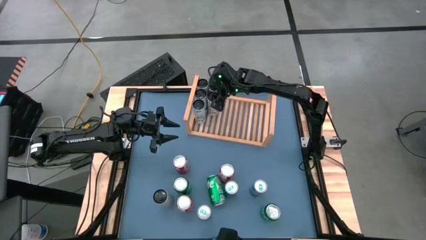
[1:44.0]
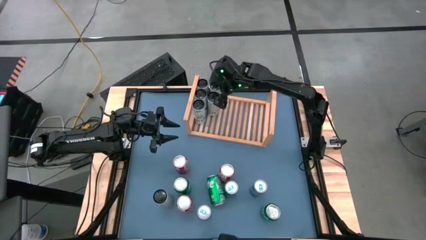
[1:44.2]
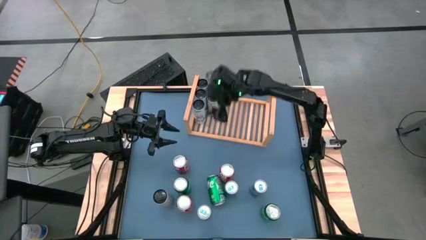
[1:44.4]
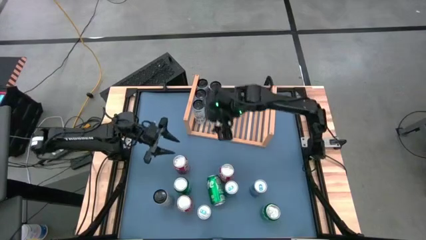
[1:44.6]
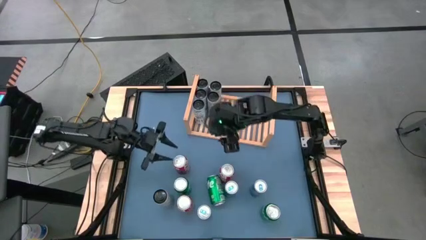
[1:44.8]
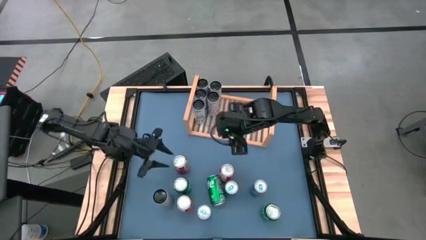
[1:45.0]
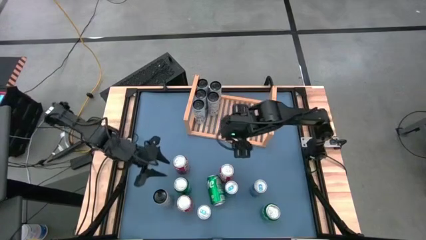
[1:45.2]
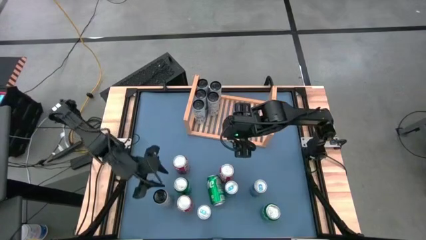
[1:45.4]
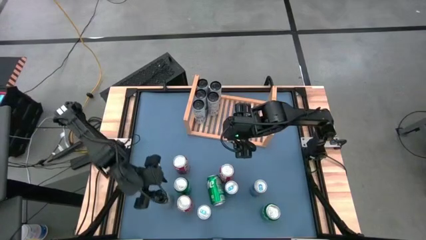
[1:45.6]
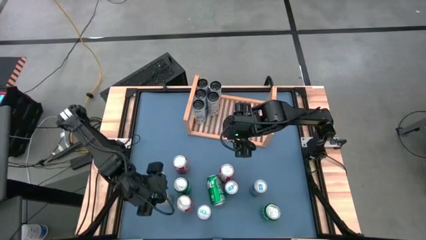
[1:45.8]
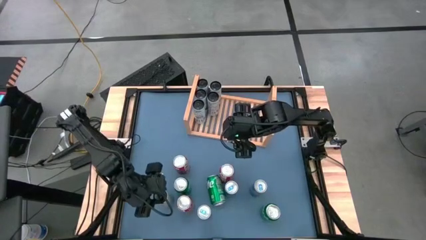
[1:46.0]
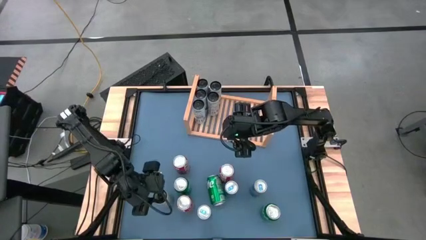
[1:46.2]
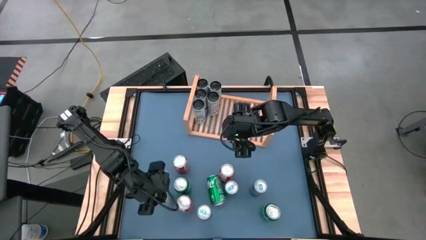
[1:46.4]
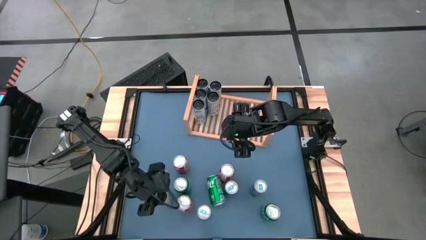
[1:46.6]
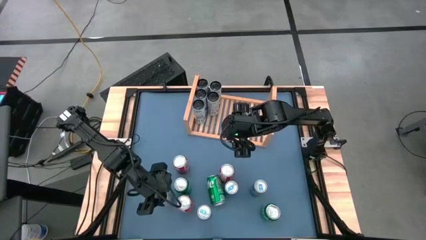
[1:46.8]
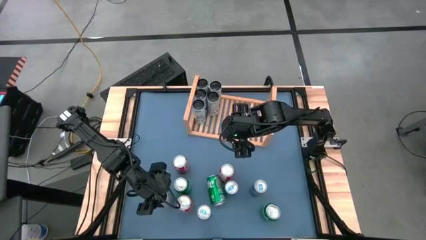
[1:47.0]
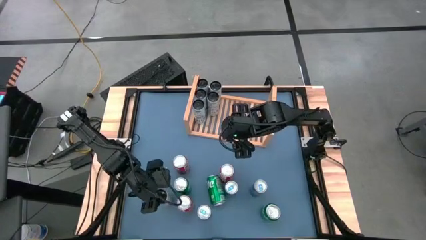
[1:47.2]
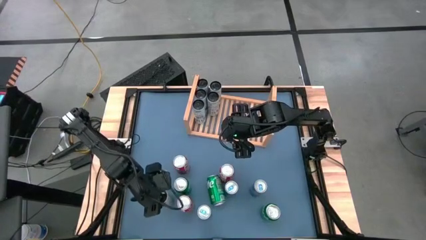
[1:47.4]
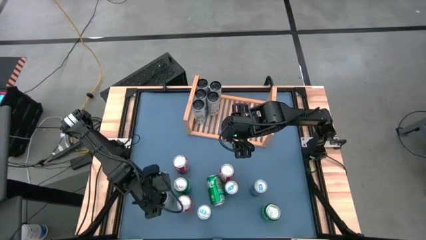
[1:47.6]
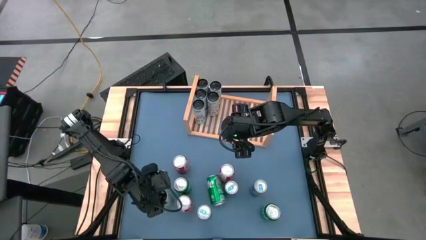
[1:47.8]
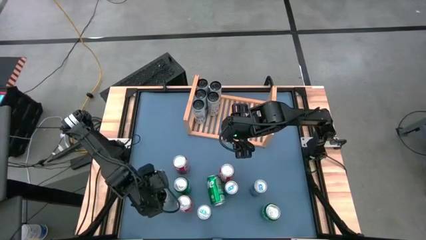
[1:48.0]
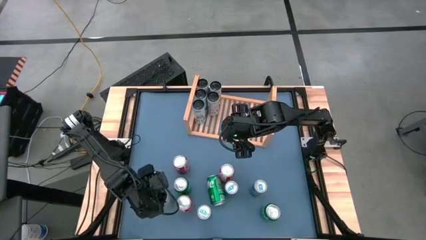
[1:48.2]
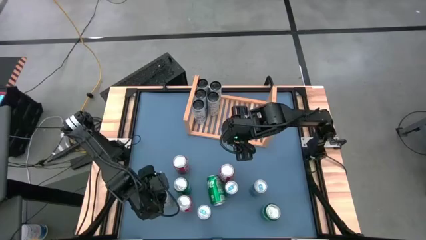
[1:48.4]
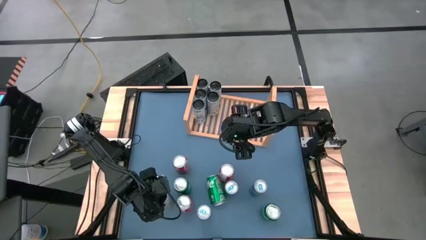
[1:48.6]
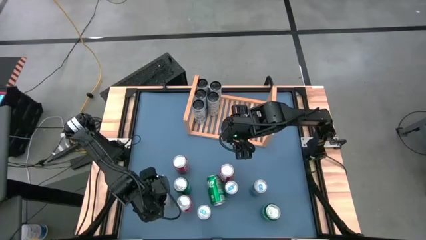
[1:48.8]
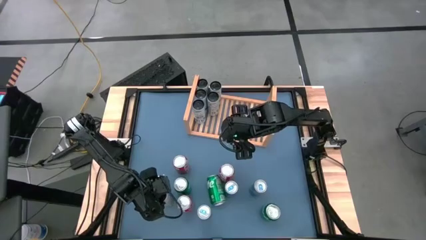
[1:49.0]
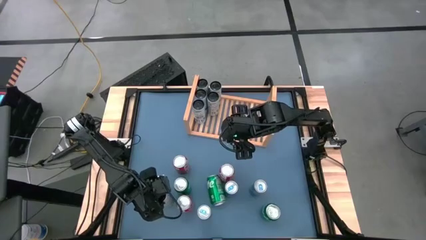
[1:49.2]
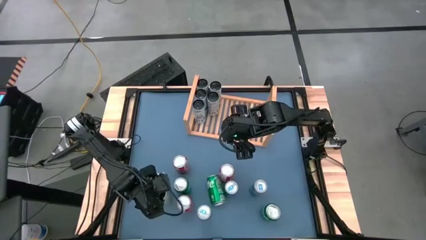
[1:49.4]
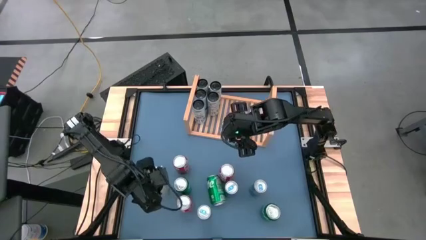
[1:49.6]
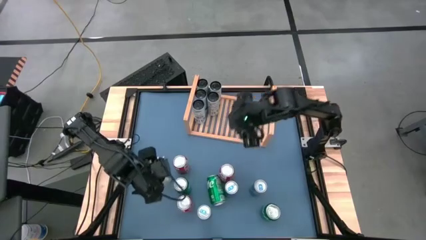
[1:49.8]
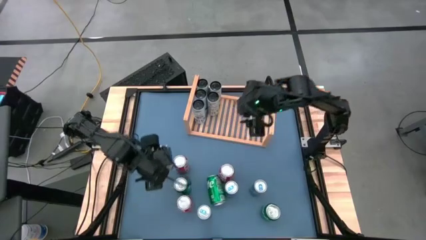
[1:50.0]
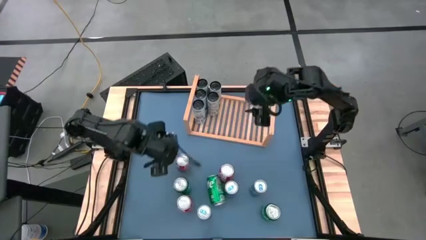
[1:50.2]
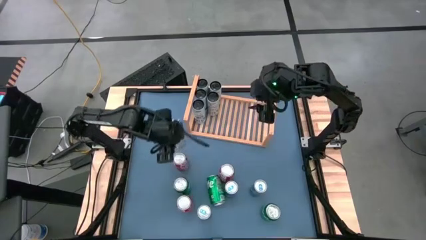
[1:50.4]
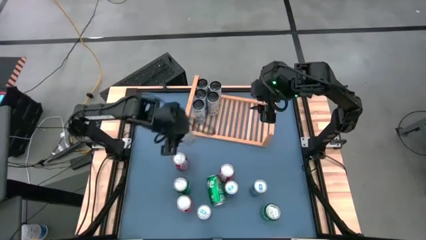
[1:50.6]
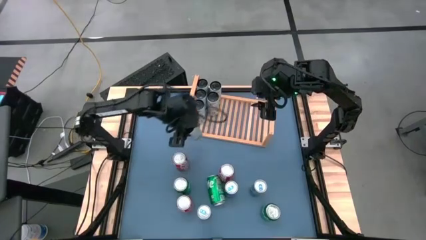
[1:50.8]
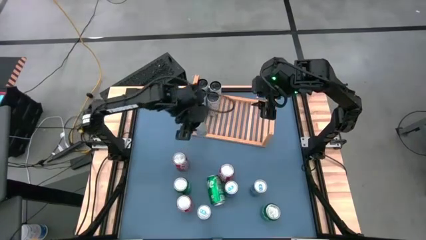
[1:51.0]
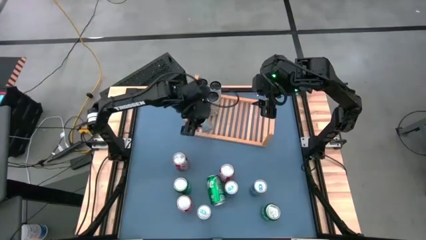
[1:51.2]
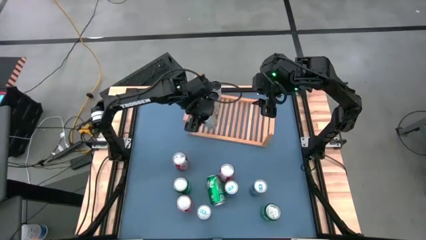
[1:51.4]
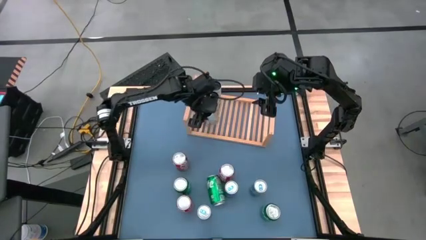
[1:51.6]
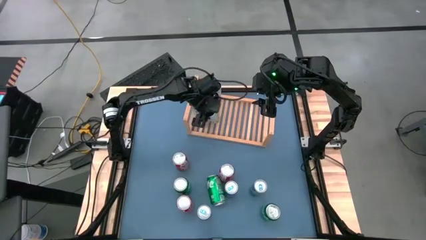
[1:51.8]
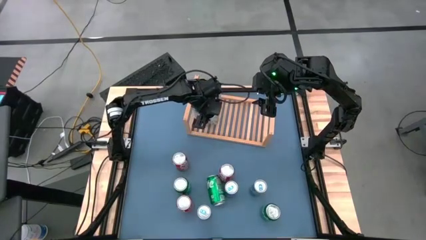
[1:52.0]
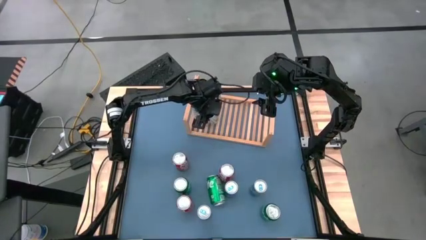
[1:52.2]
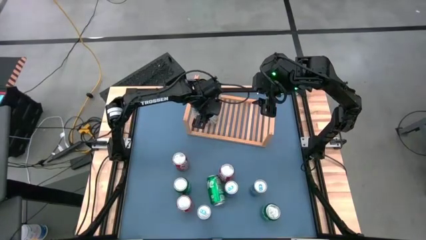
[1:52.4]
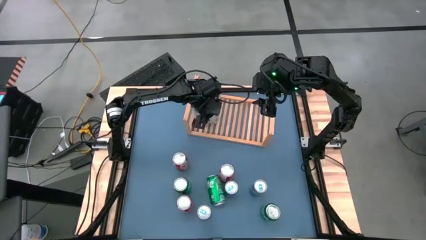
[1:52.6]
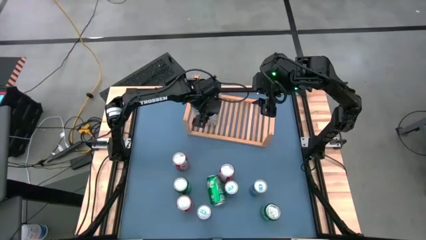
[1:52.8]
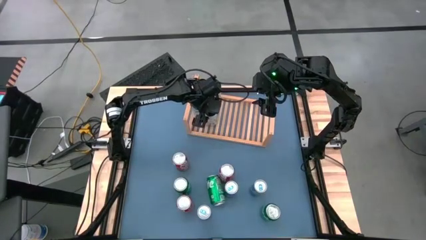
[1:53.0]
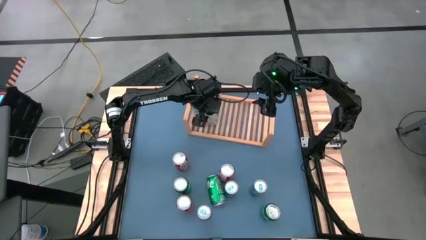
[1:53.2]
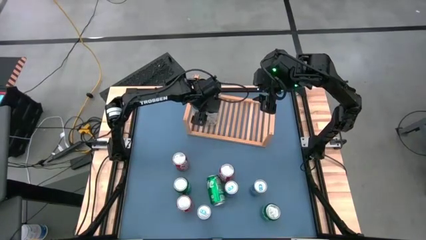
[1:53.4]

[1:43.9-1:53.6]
Task: Place canned beverage on shelf
Put the white yellow soda can on the shelf aligned with the other white yellow soda can

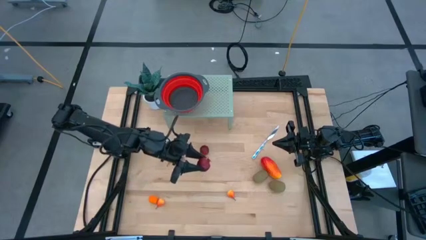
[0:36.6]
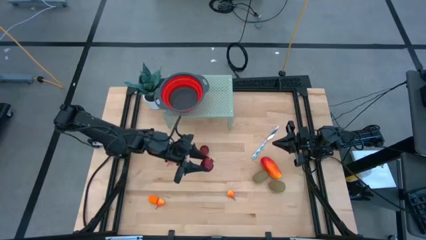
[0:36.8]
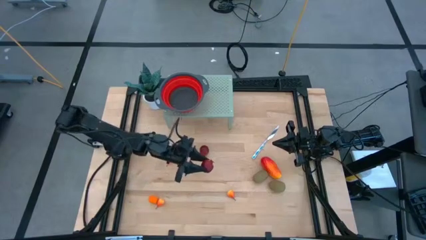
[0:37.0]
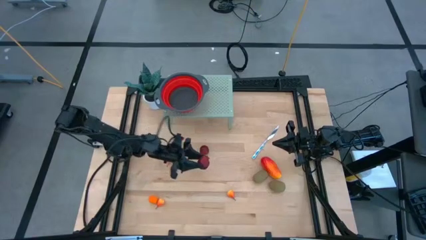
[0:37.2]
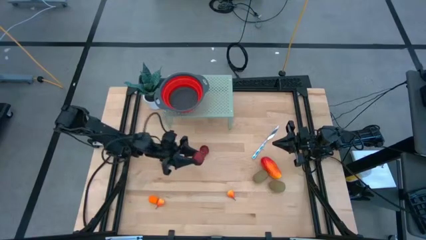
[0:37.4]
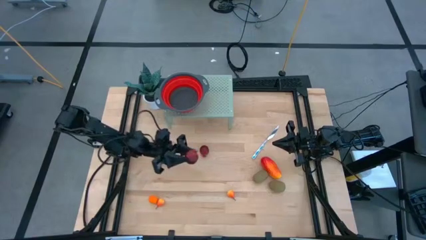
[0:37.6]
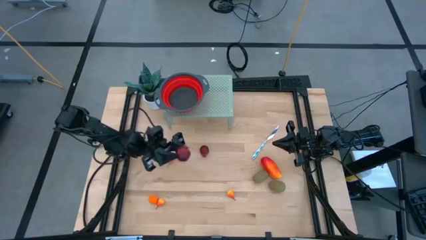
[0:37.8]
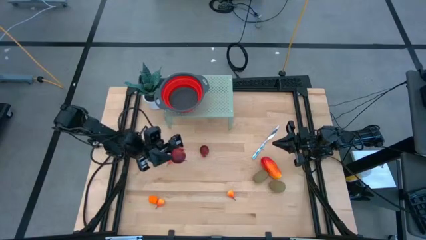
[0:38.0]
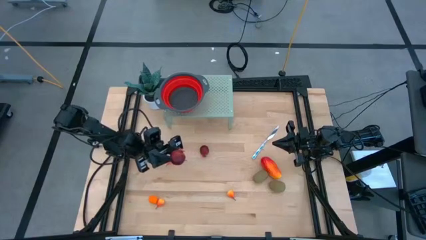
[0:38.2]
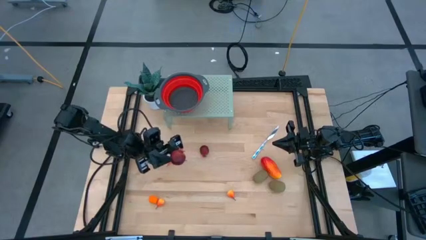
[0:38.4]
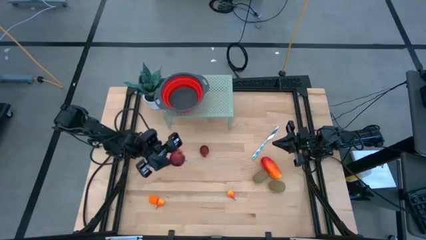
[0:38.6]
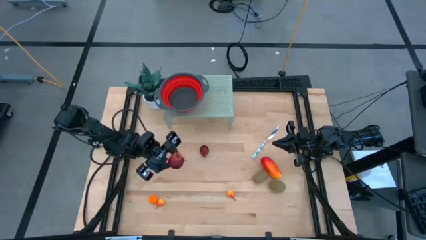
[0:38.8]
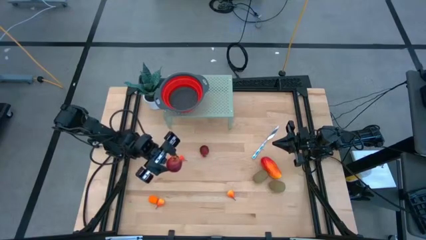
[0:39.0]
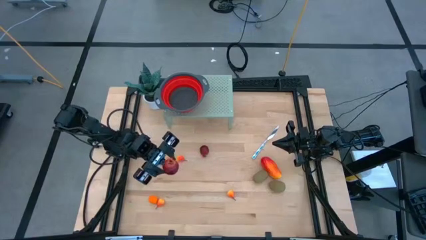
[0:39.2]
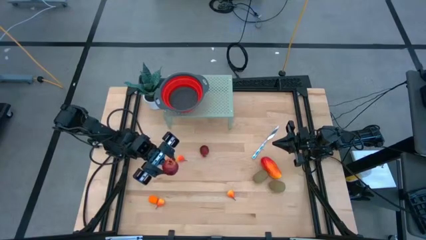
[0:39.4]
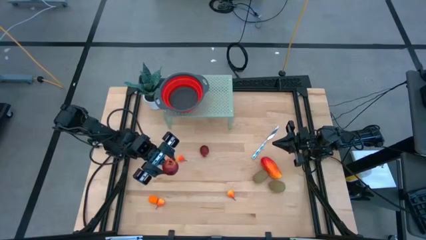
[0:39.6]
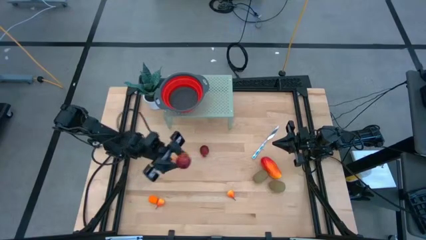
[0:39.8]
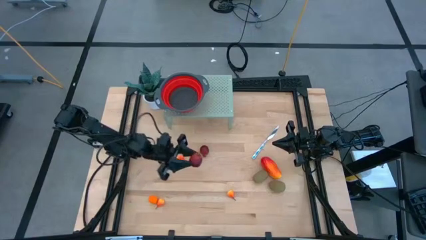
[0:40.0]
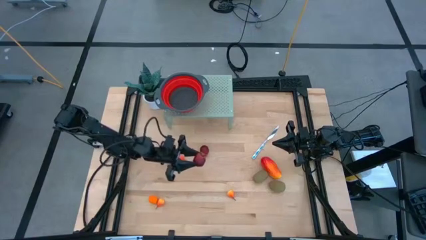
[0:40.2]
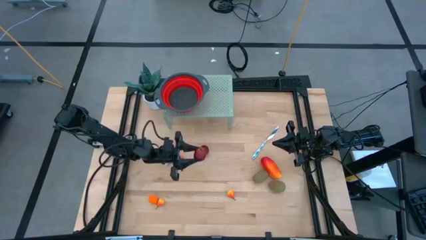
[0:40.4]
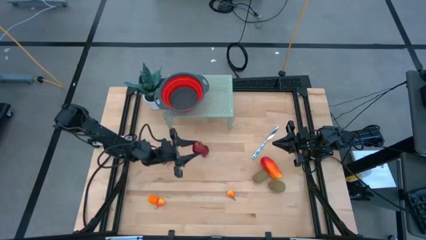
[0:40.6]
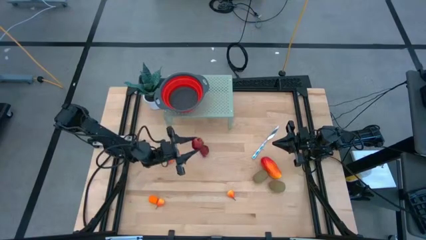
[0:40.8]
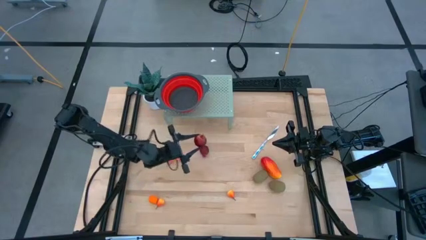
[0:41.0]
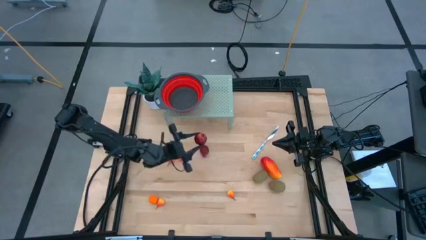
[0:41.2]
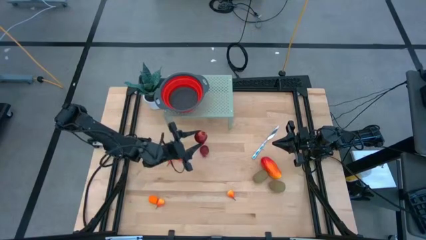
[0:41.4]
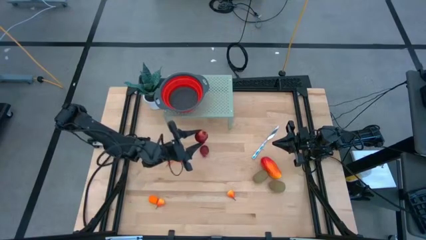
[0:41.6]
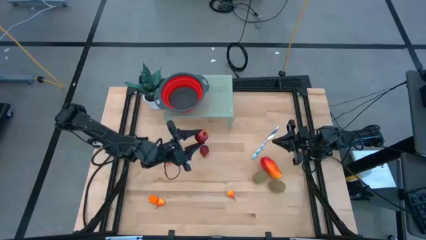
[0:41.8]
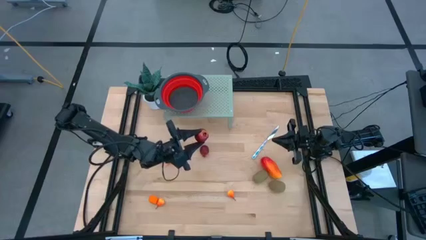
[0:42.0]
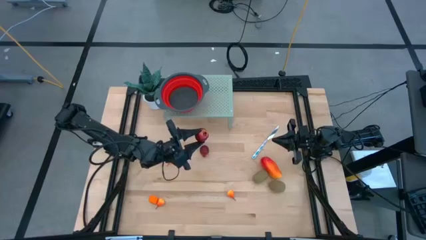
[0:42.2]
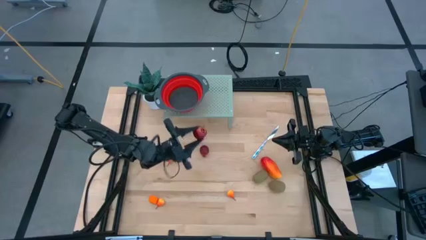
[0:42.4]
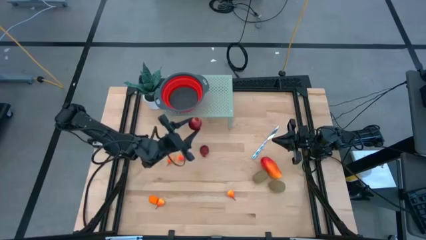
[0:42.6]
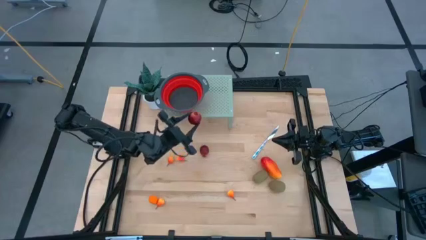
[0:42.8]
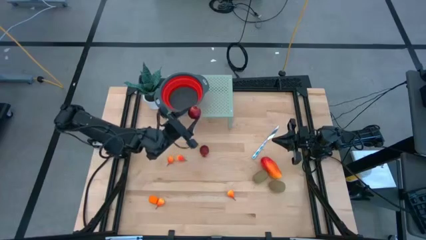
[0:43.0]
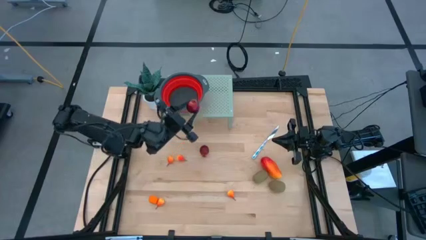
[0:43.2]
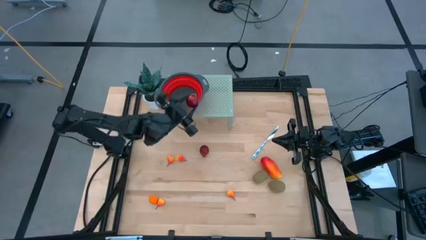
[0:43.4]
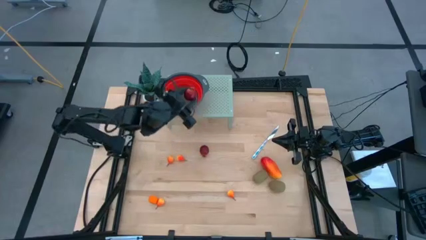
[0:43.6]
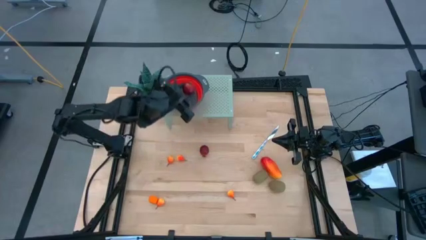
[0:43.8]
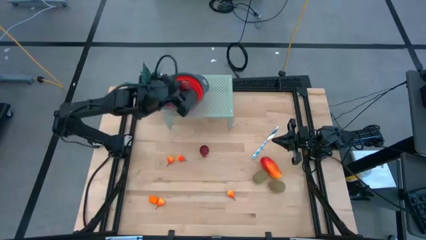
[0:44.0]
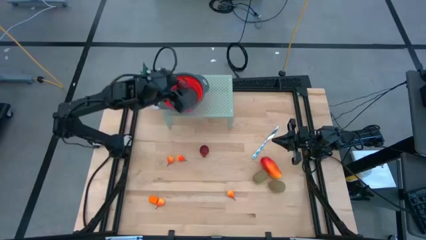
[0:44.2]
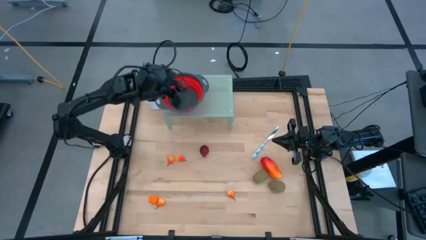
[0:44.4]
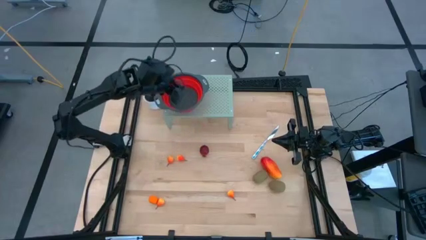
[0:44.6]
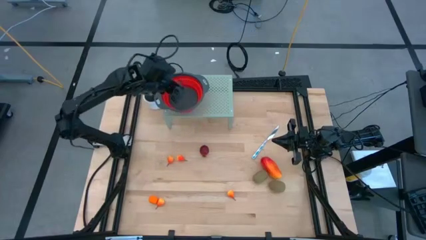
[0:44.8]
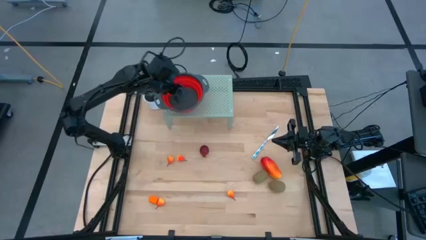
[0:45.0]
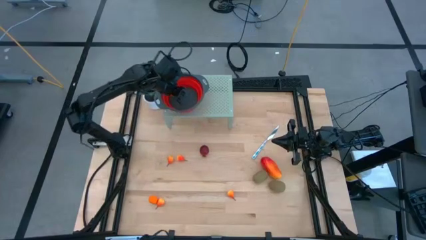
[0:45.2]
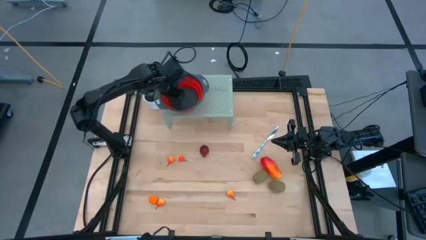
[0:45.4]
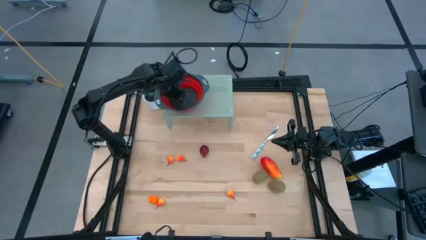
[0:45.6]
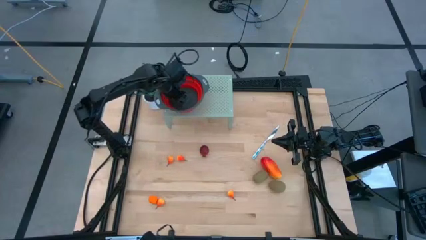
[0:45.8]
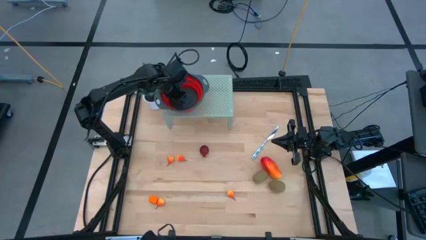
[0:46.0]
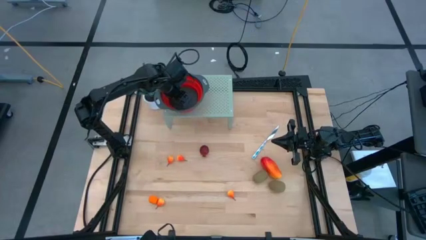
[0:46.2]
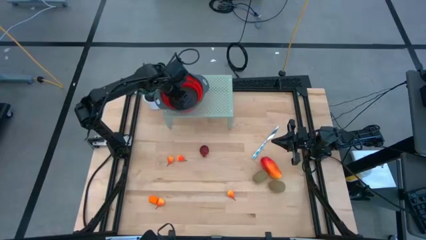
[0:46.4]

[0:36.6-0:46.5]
Task: Pick & Place Fruit
Put the pomegranate into the red strainer bowl on the shelf
